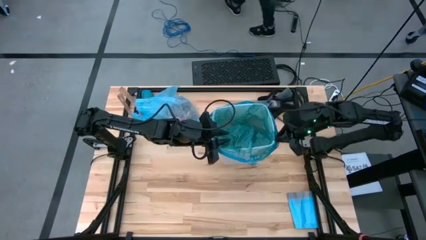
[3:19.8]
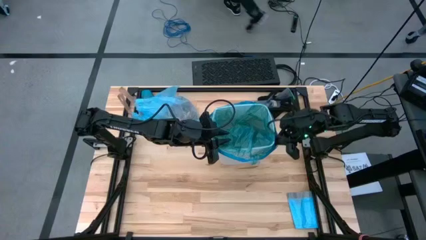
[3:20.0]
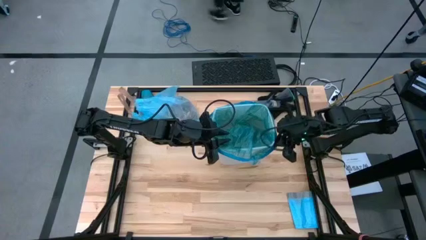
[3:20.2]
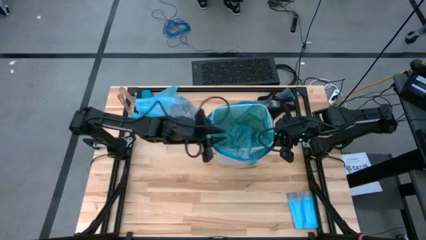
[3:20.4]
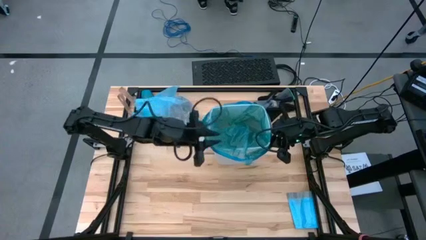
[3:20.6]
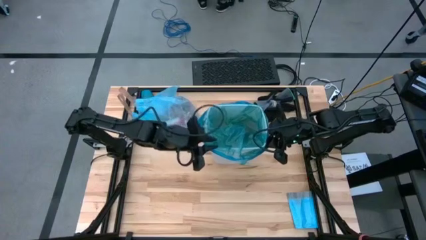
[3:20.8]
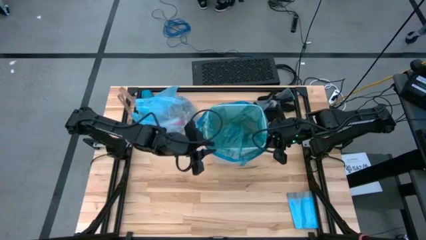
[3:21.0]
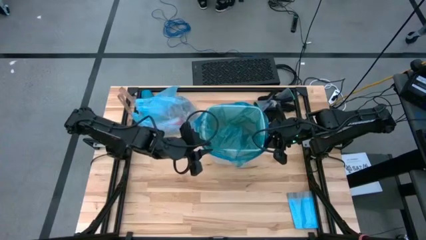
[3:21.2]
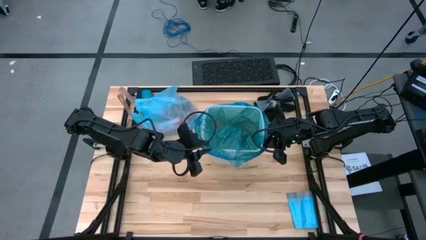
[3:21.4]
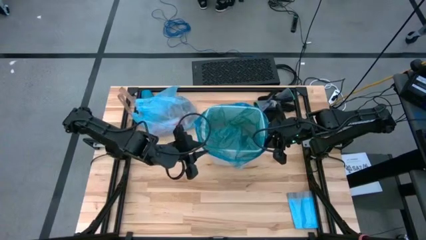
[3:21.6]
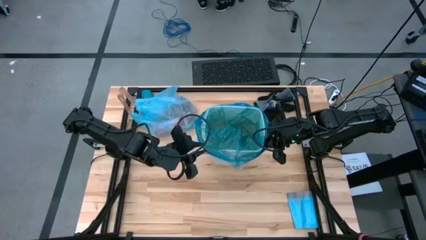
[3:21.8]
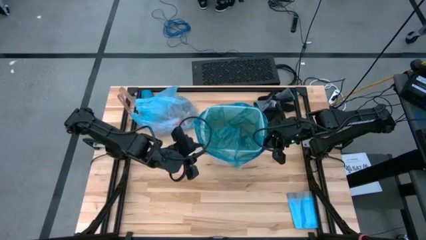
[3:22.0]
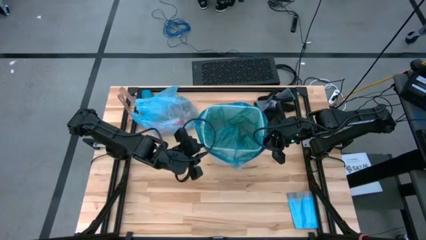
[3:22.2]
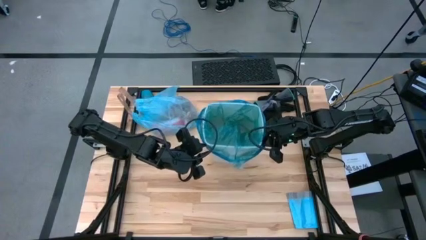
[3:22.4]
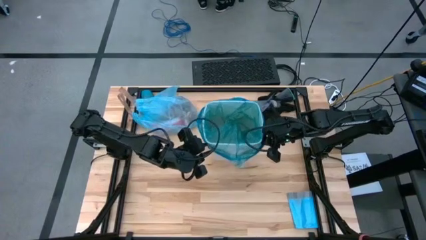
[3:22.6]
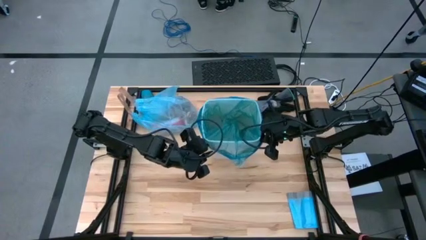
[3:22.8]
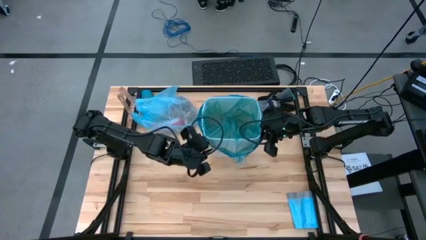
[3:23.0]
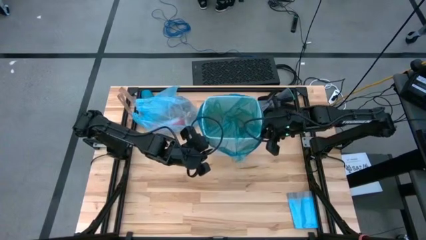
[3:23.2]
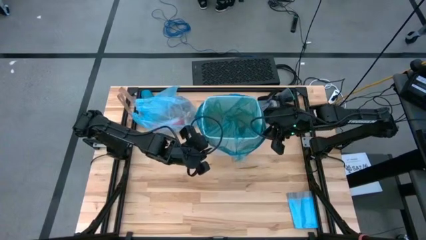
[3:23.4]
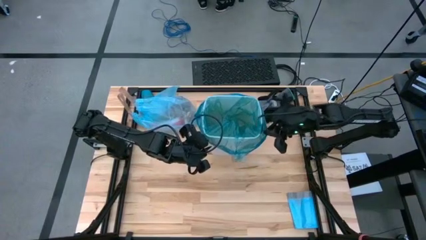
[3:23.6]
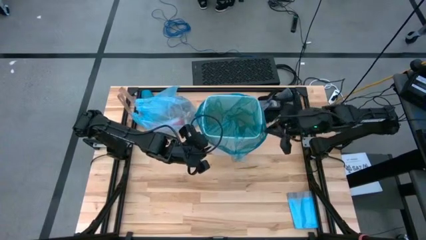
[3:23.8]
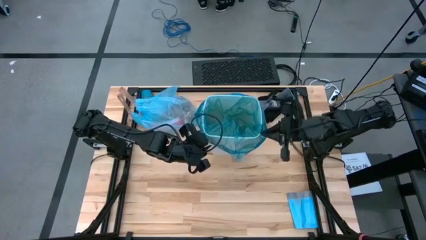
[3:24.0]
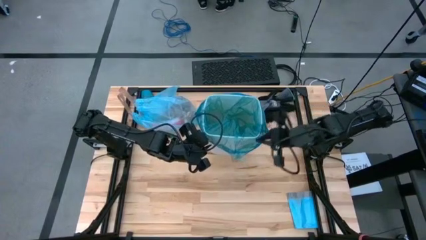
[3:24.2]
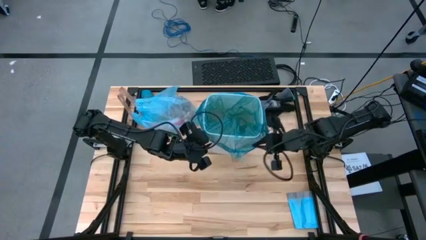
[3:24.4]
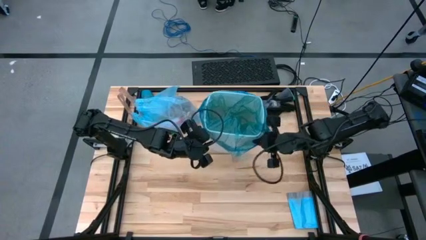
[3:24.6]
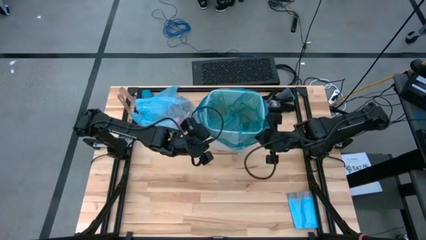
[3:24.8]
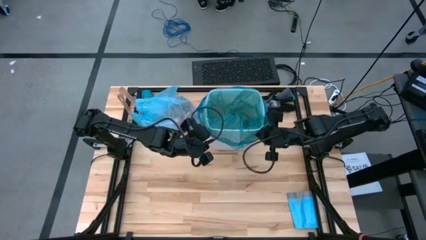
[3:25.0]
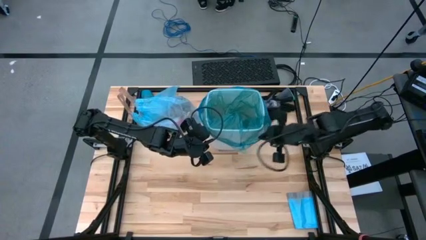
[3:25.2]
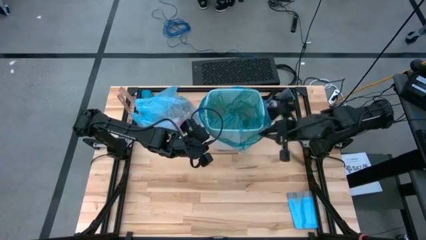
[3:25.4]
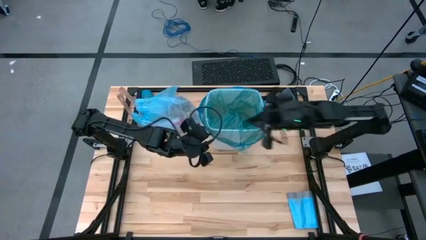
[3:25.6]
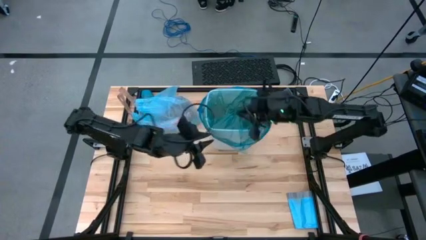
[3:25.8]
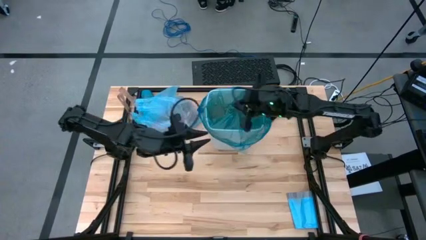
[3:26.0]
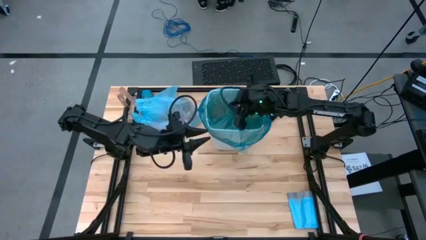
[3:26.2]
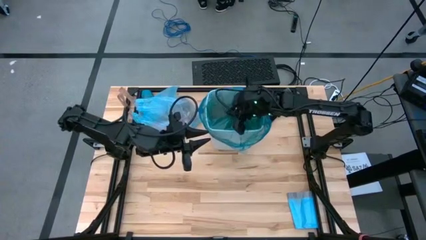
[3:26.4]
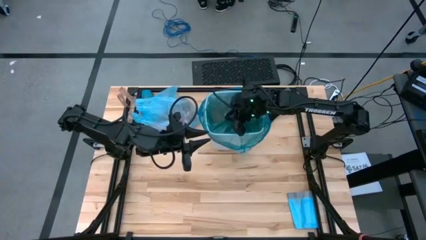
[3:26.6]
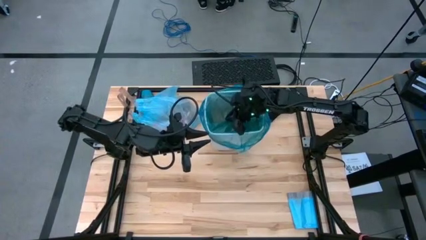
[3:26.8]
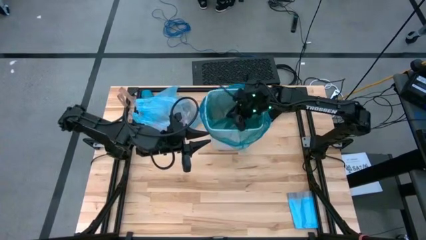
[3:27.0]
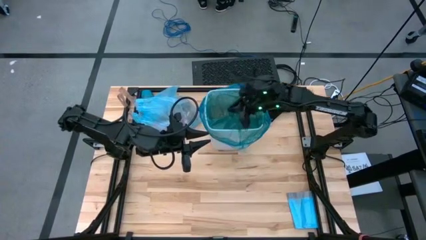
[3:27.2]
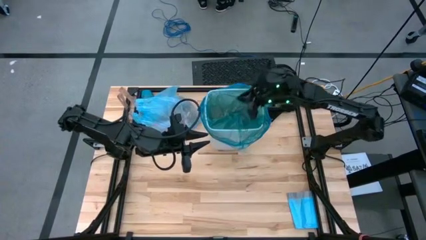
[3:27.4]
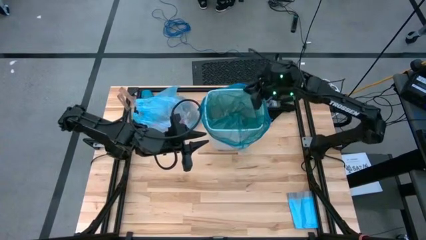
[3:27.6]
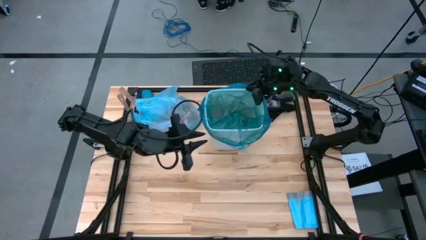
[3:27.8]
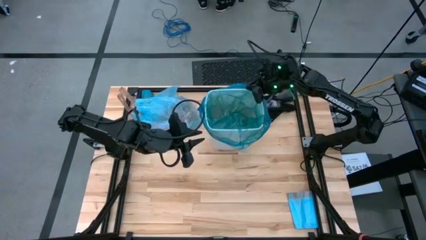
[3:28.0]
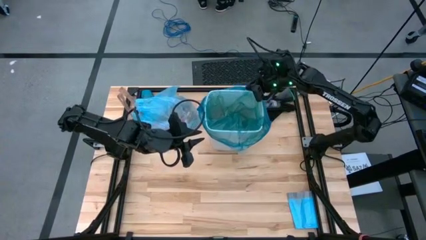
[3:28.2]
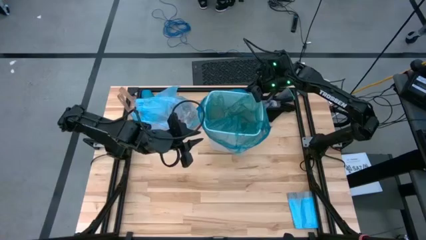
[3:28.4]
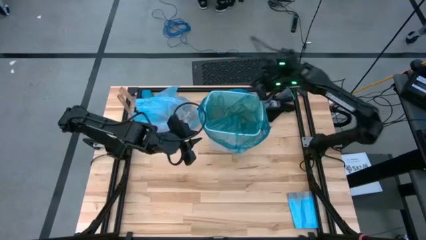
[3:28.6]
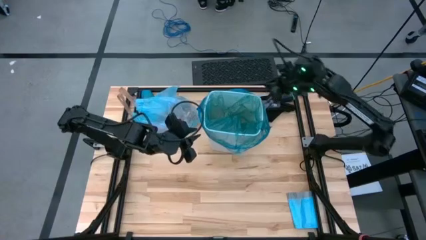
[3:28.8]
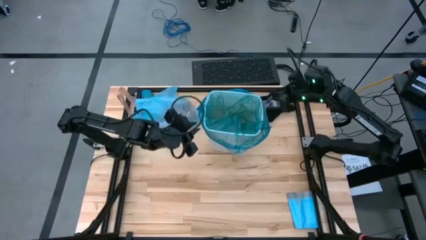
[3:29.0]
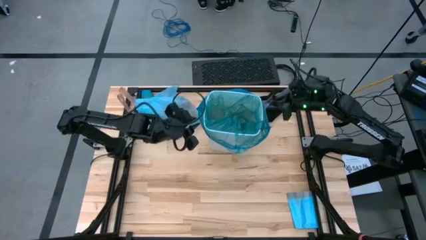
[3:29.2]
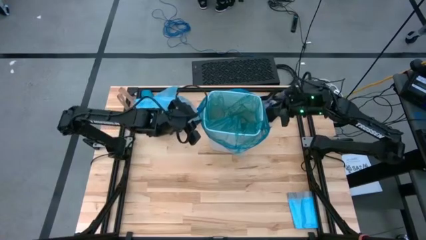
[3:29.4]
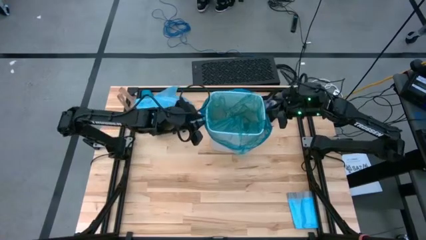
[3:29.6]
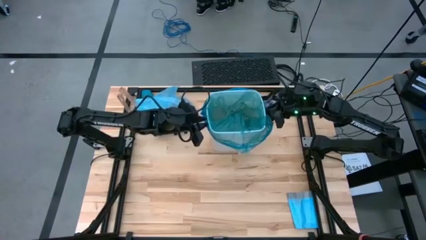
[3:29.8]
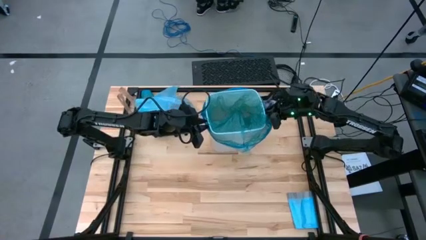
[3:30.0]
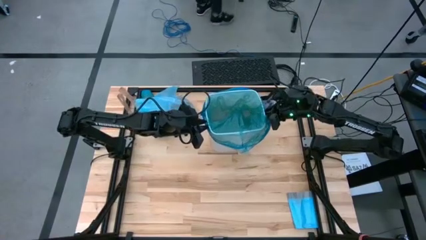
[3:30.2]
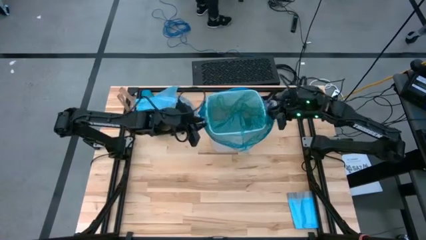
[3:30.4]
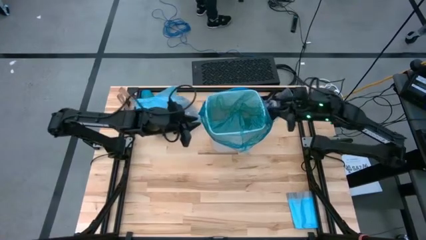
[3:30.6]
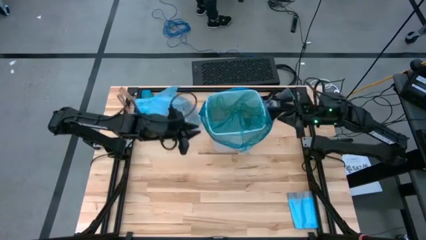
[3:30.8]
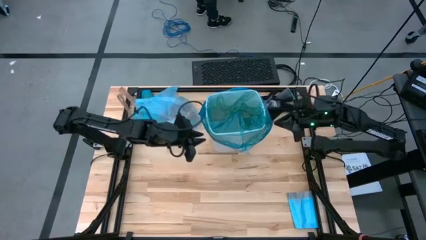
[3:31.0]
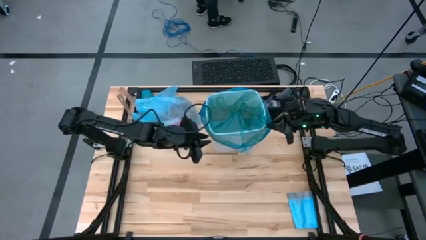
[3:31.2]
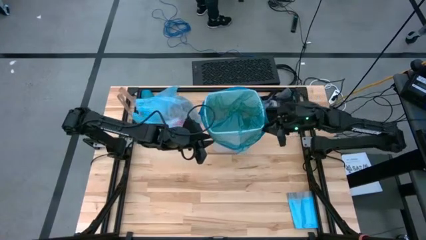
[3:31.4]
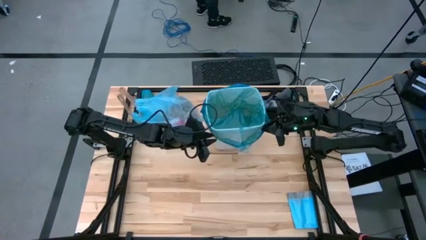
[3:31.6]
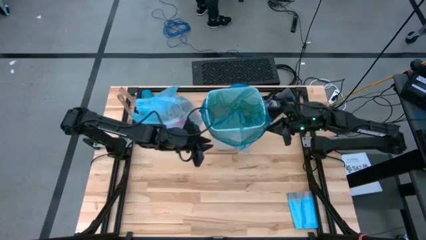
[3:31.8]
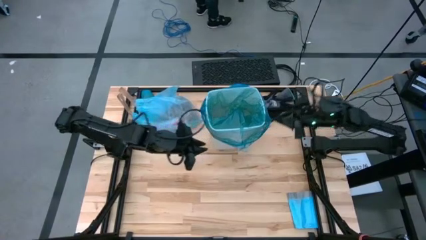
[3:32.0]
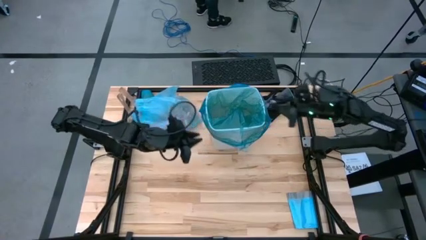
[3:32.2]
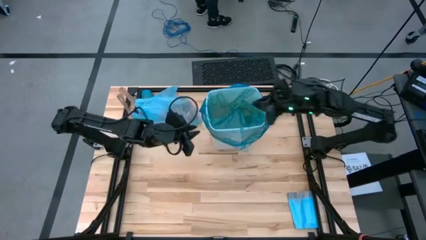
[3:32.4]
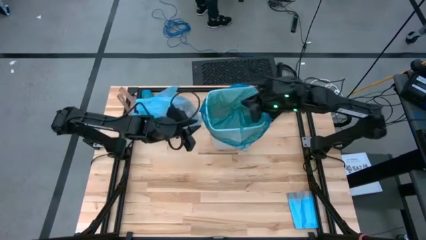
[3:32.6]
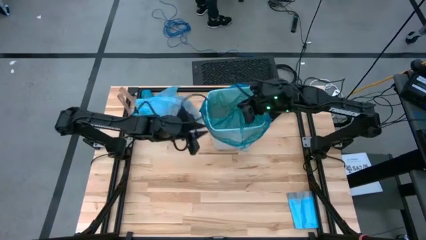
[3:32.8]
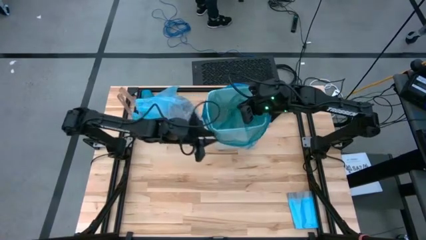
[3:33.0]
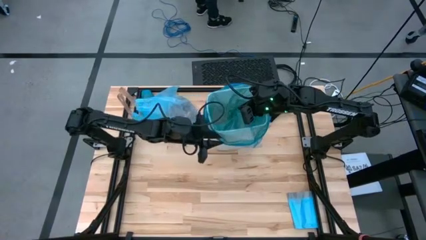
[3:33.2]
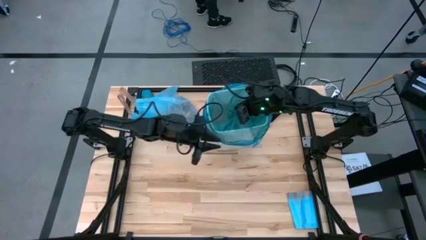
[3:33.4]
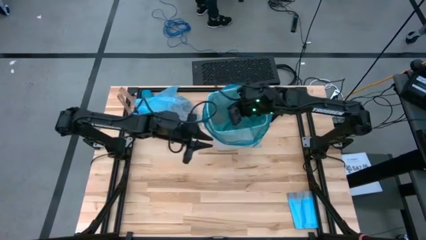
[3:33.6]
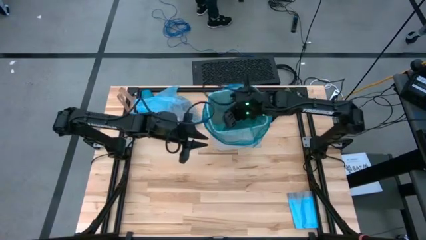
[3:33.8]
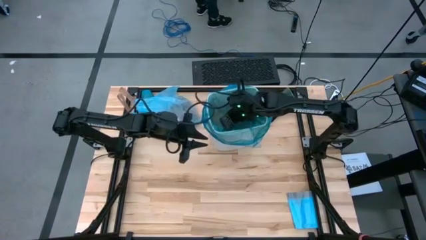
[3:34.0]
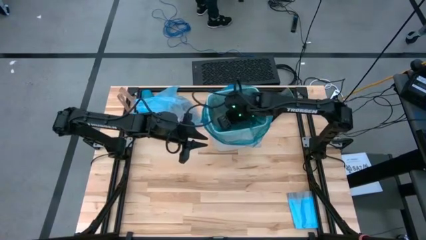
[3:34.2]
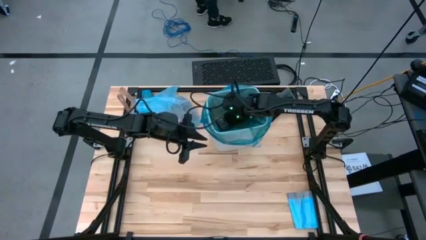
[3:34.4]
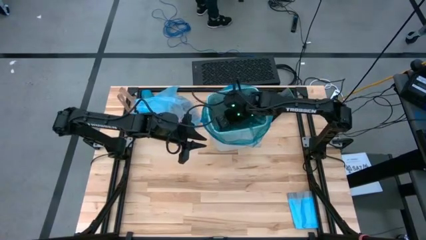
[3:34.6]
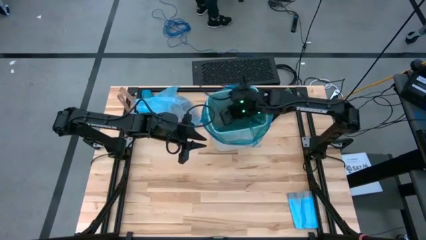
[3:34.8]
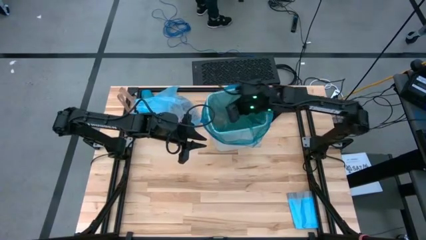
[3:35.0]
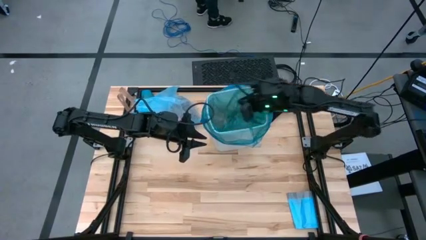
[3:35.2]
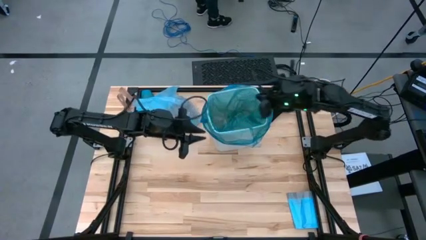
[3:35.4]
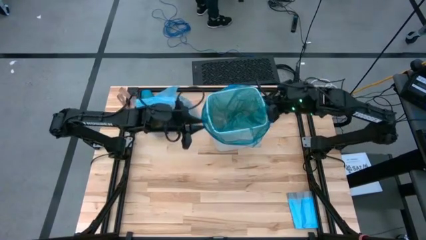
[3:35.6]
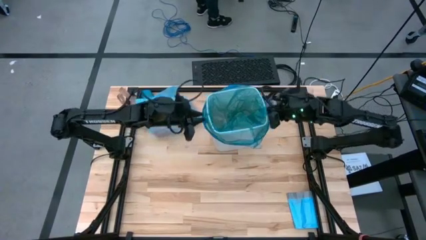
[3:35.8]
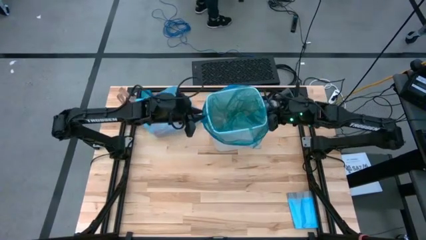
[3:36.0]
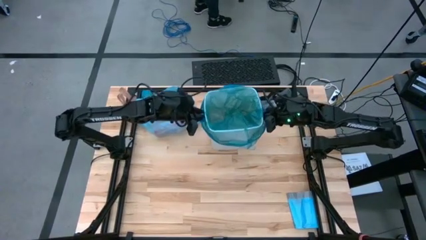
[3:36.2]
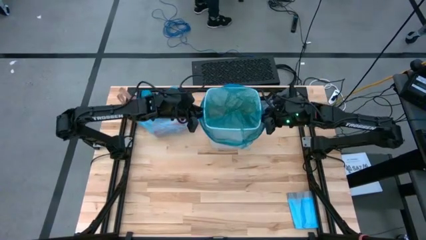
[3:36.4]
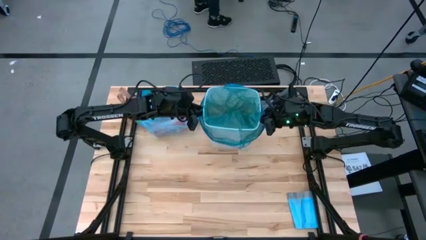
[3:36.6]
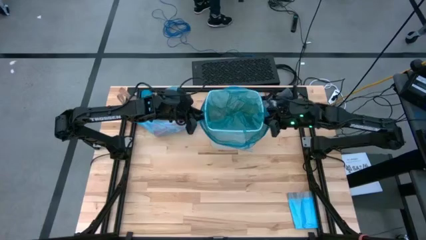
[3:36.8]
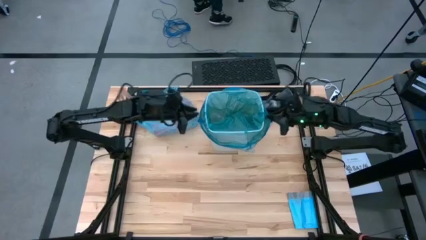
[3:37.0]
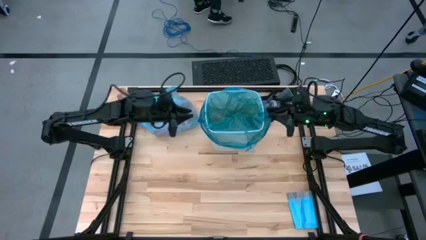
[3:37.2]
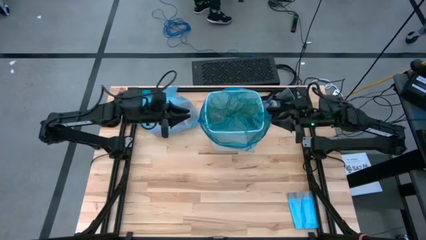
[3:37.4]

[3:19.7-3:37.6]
Task: place trash/remove bag and relplace
Insert the blue trash bag into the white trash bin
